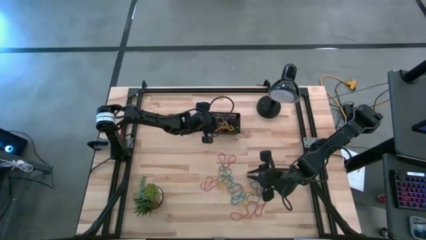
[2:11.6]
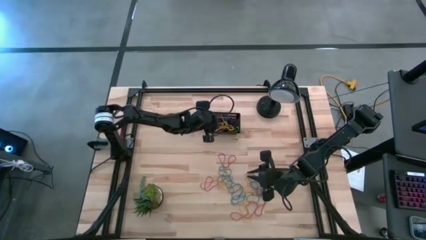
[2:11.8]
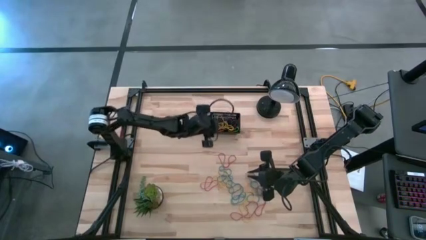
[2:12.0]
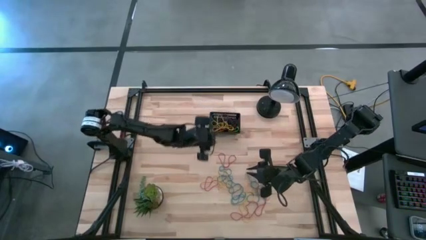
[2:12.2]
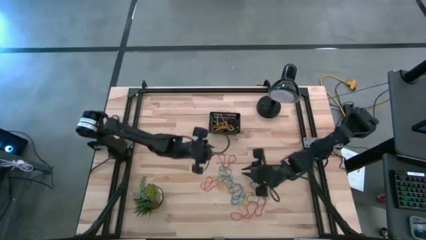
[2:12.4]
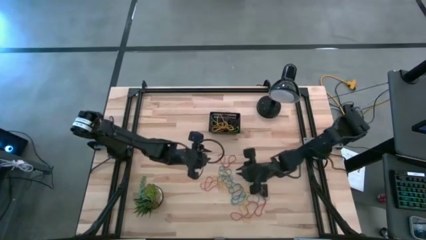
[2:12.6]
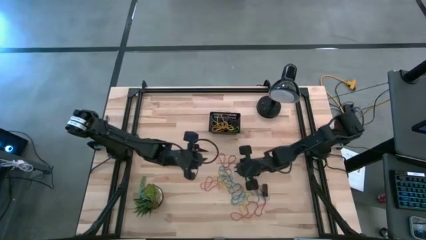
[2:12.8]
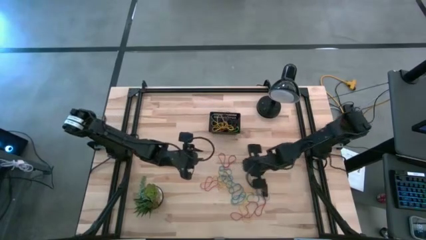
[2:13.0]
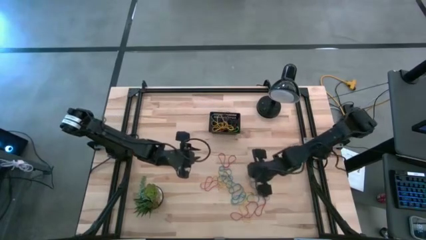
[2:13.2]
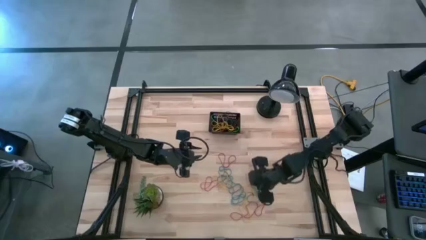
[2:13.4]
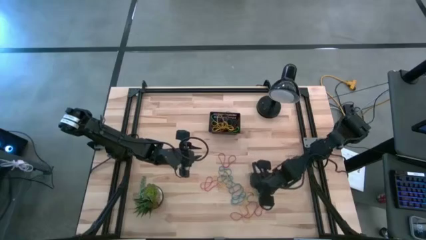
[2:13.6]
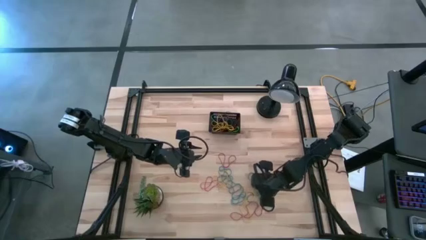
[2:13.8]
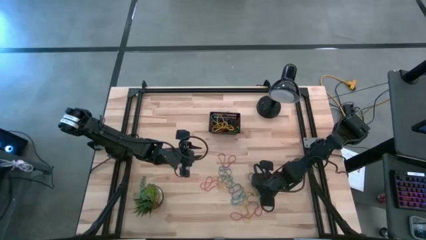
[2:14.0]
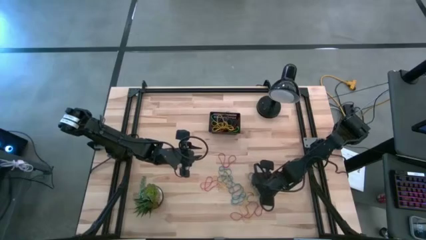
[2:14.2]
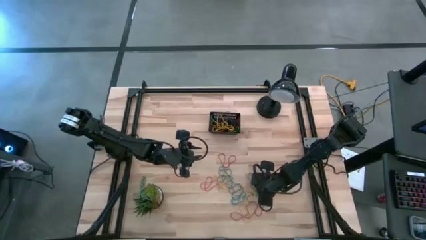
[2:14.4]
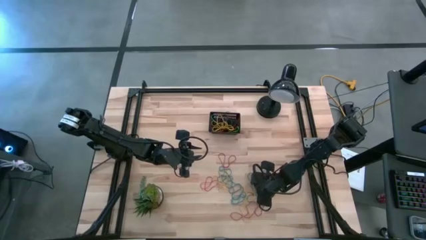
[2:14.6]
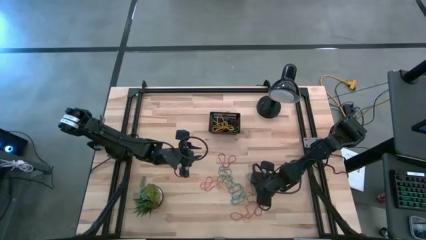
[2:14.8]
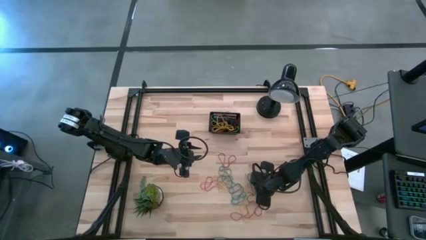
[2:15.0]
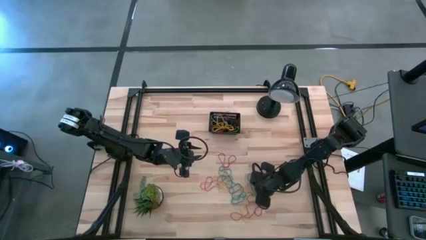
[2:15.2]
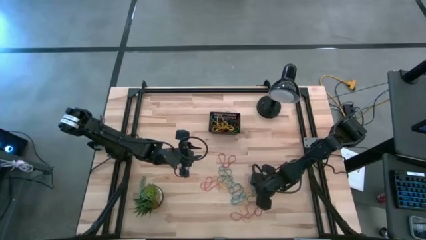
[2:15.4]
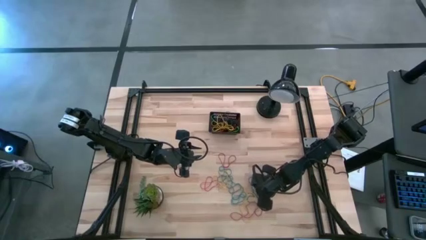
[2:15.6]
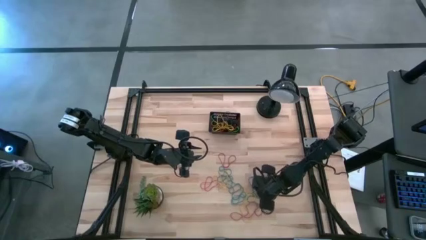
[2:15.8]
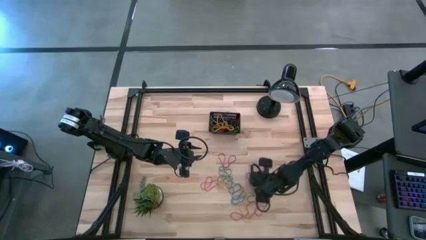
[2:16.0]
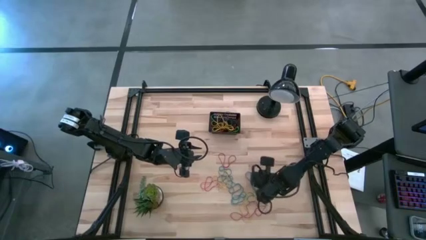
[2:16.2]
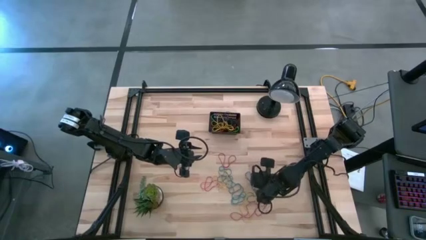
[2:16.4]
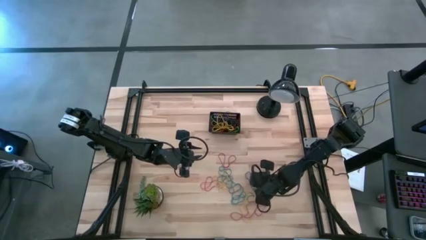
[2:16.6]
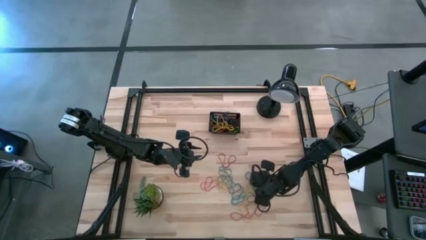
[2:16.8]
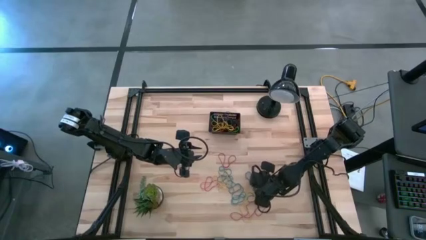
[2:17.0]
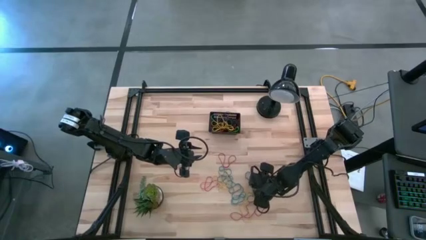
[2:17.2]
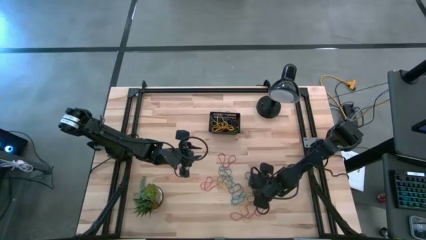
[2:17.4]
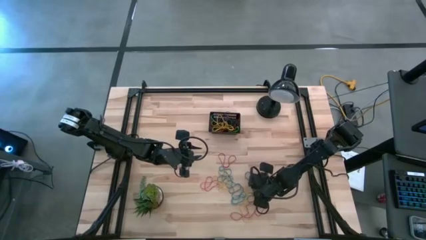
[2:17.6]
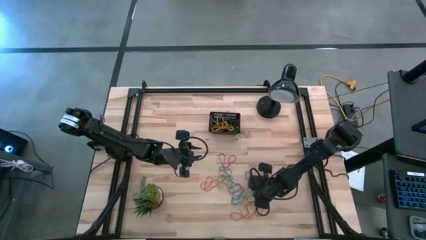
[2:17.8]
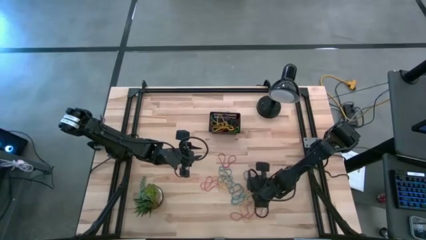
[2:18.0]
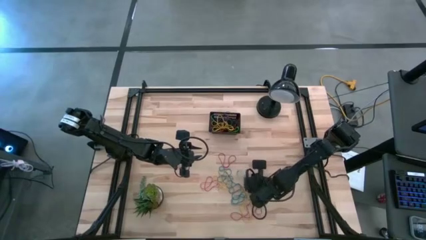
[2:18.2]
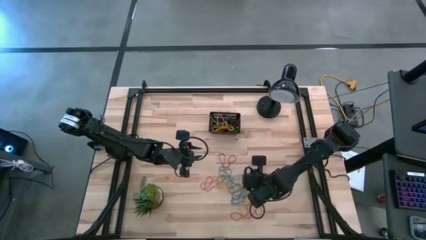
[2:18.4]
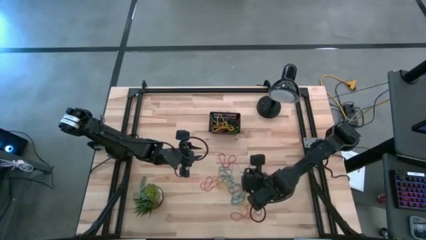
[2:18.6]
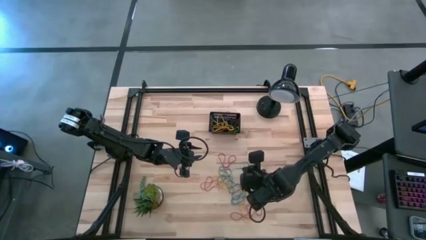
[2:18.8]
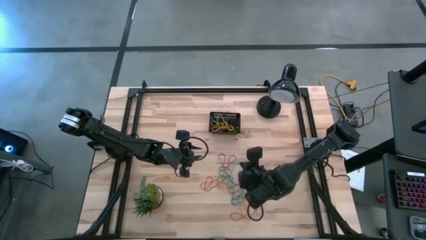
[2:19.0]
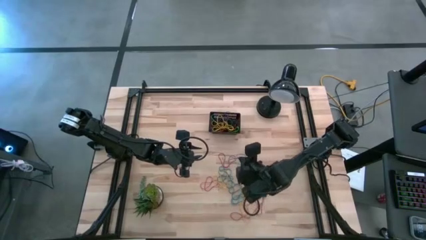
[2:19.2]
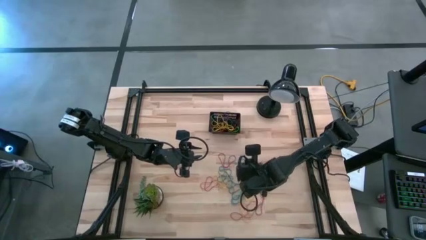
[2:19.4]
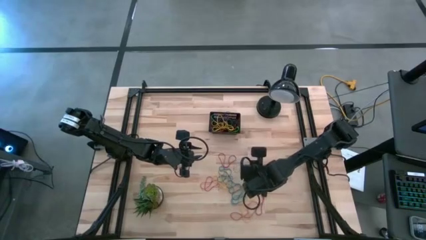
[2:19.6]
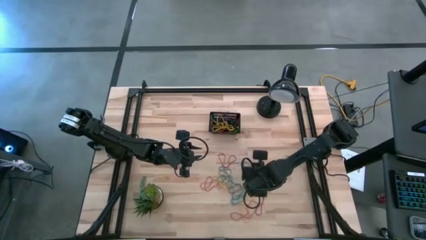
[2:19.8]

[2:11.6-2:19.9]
Task: Pick and place rubber bands into bin
Put the blue rubber band into the basket

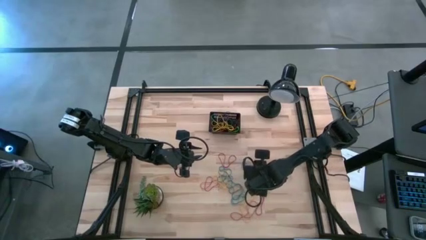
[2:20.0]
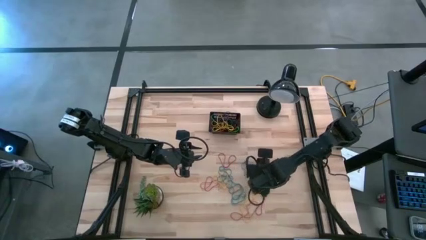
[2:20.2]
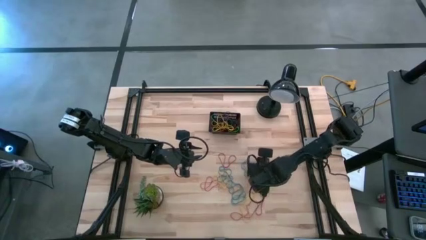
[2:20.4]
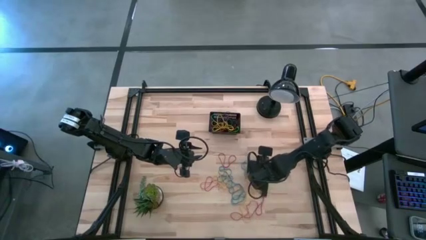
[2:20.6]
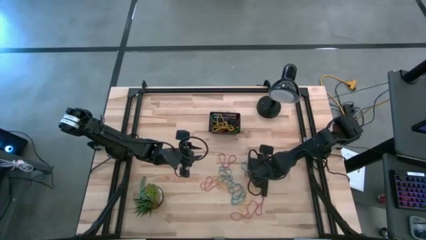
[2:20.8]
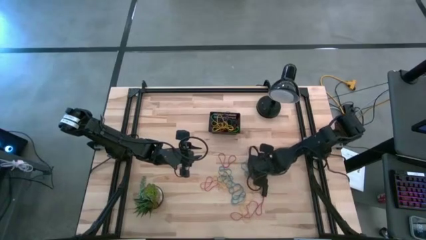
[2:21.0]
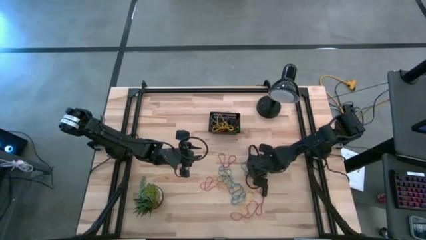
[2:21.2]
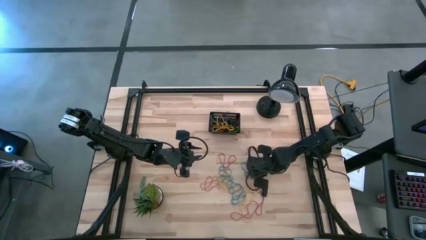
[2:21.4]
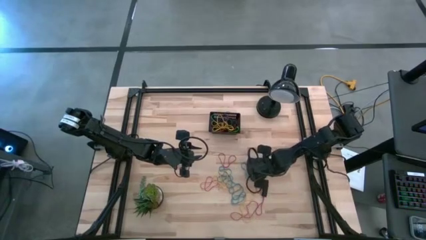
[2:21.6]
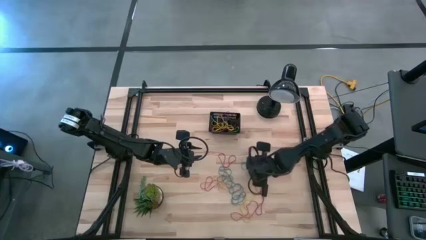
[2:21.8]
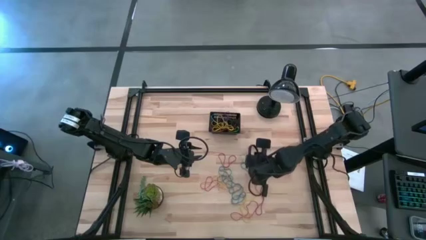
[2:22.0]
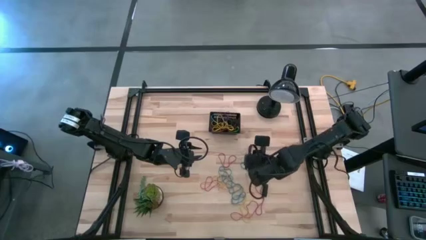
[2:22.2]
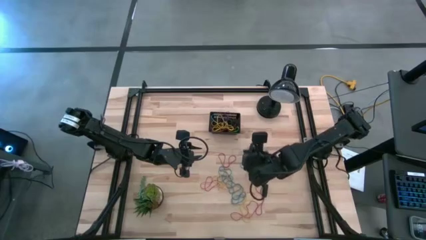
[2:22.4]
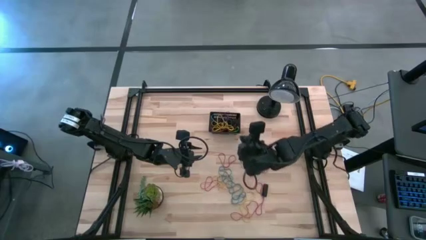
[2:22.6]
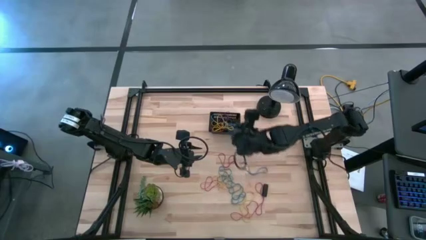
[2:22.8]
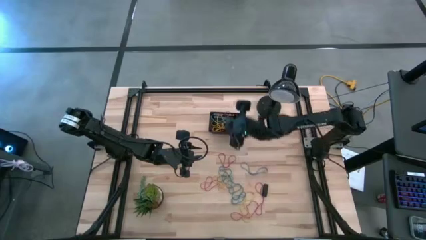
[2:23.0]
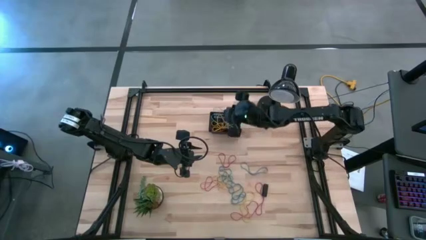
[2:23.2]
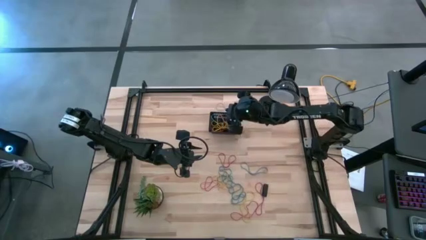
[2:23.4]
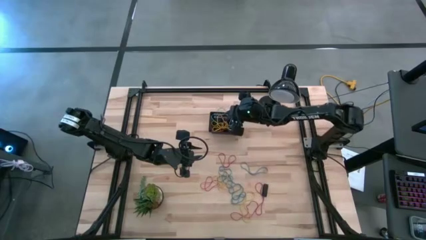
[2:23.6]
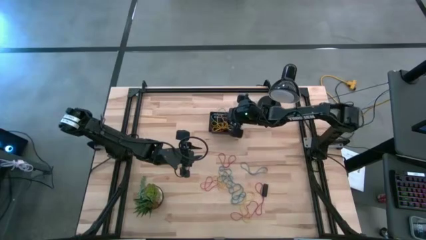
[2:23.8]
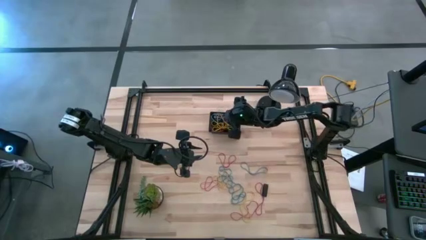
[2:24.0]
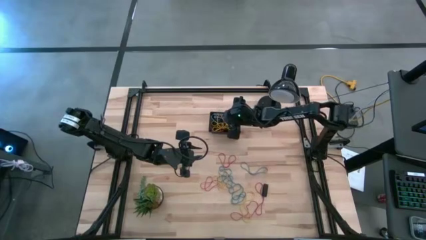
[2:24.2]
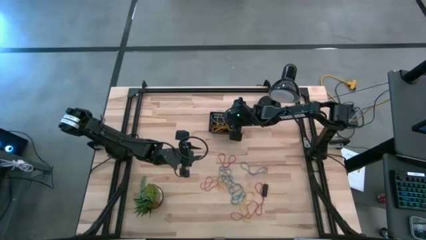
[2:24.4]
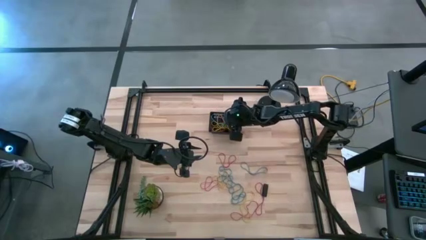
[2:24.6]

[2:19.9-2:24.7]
Put the blue rubber band into the basket
